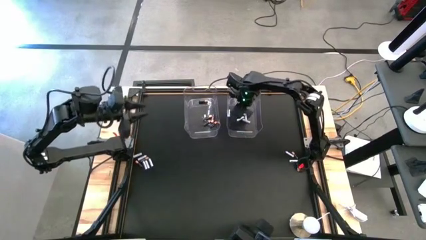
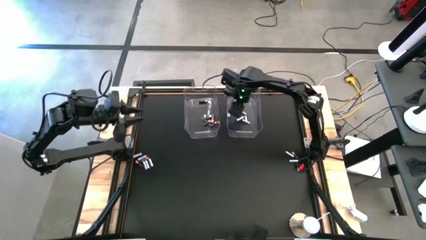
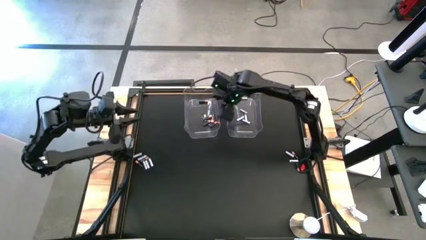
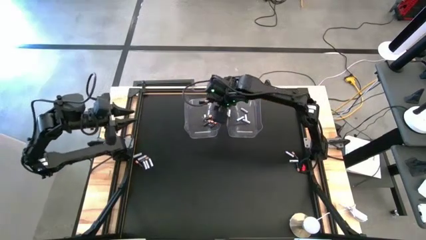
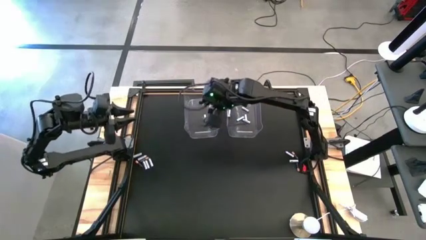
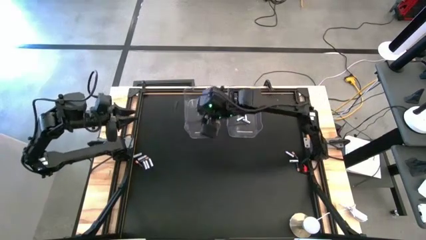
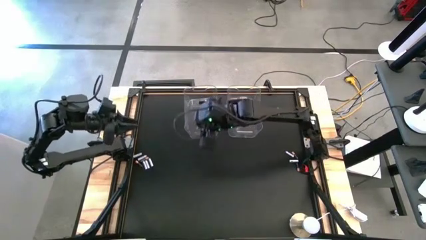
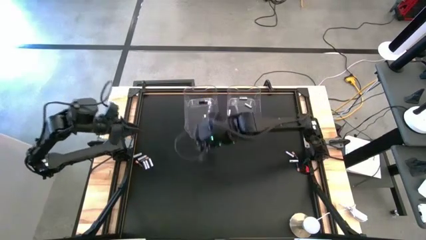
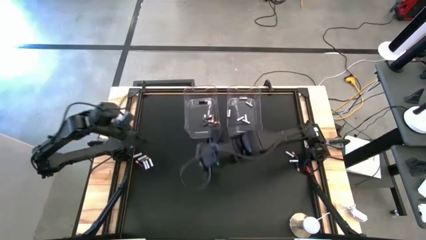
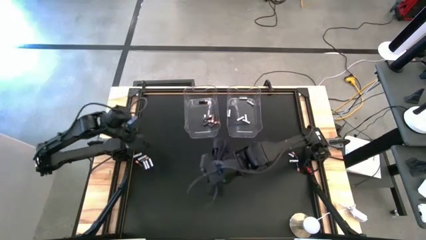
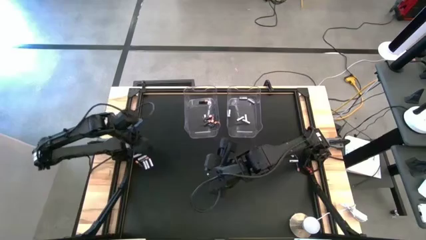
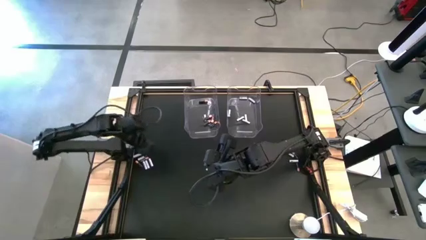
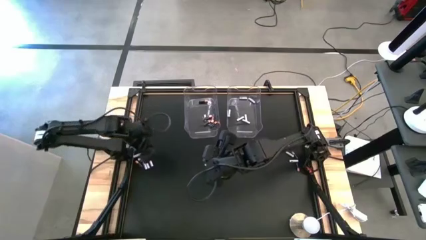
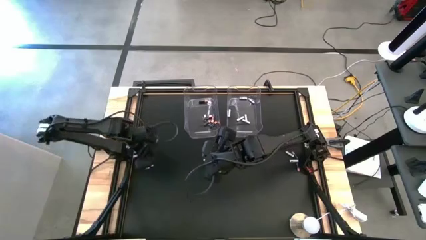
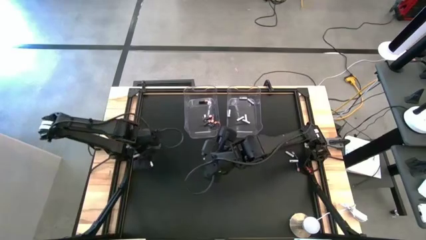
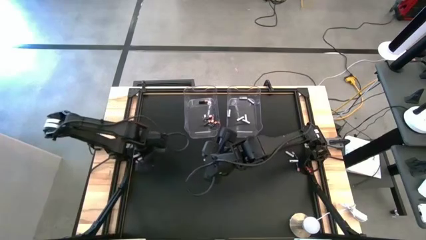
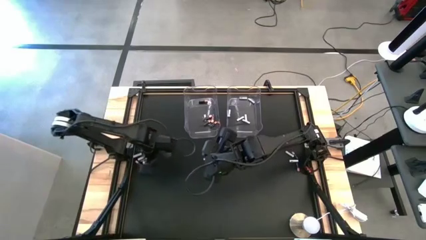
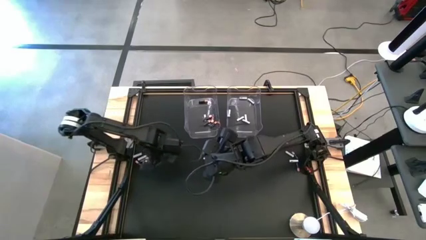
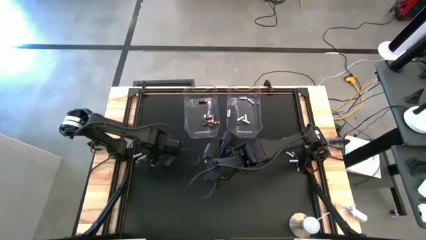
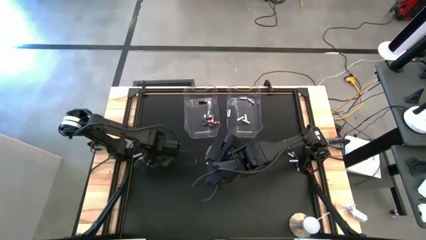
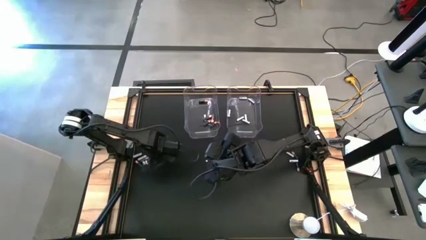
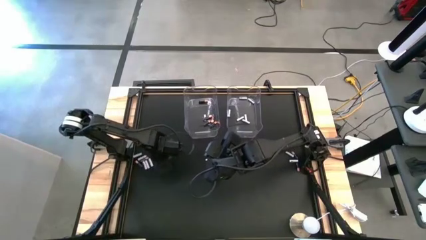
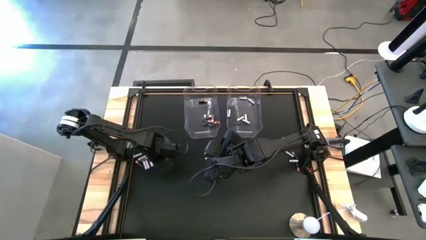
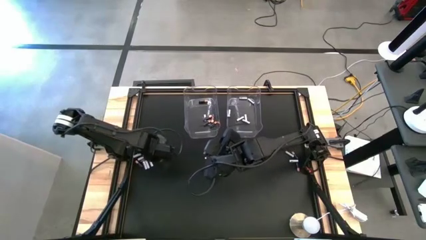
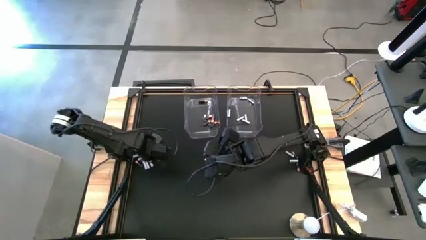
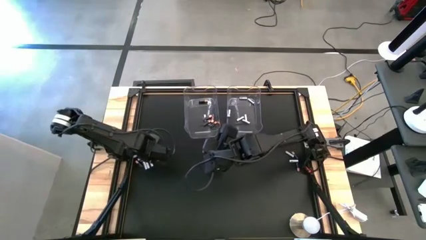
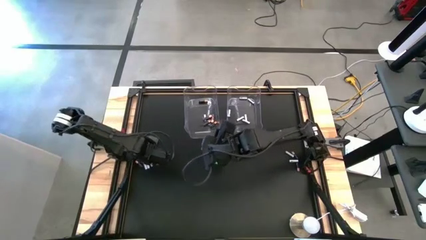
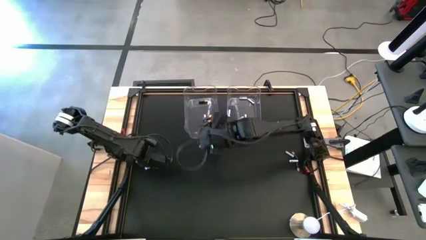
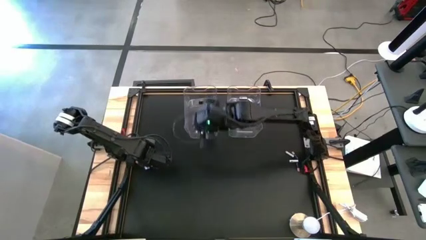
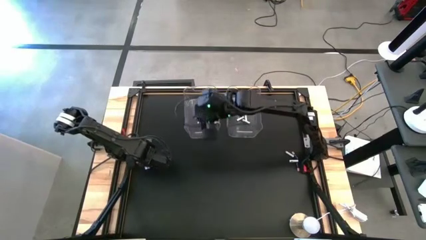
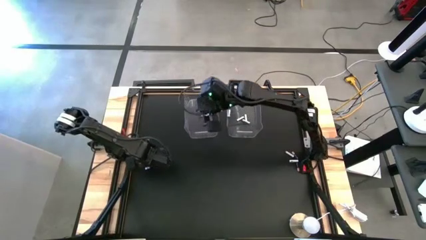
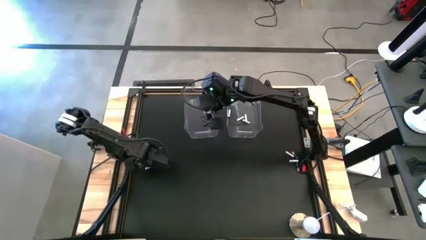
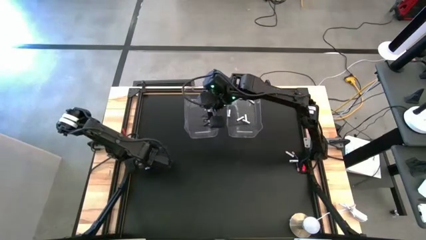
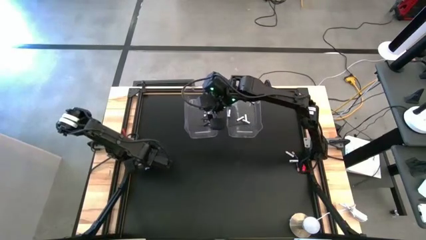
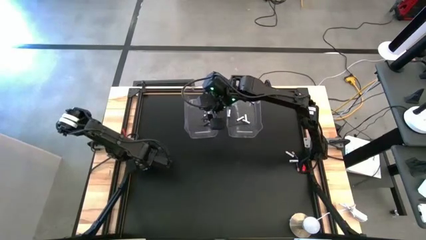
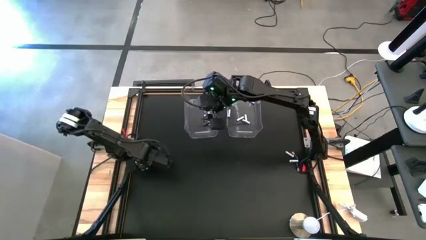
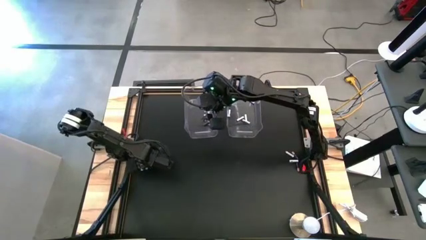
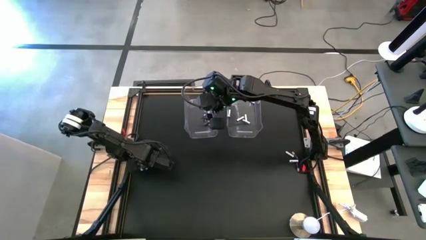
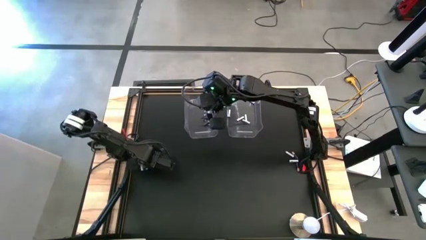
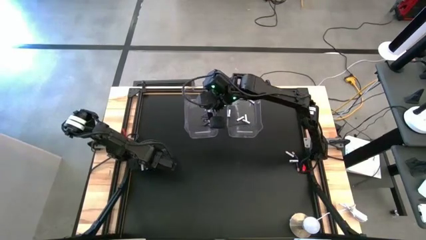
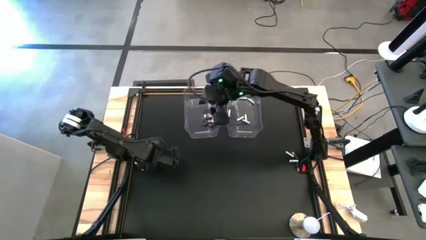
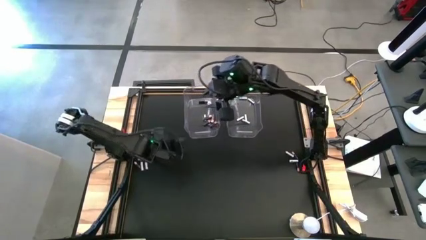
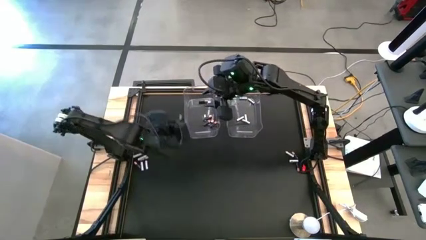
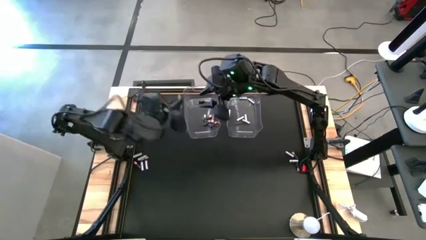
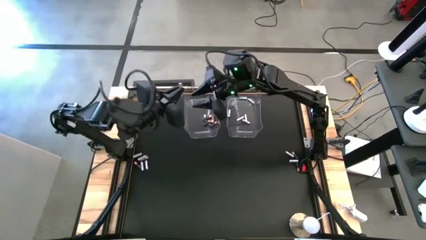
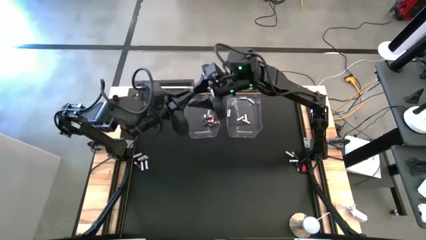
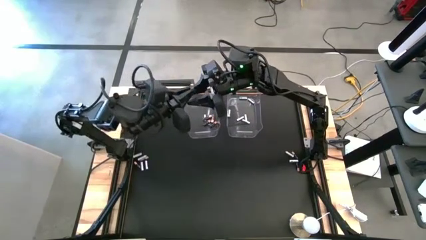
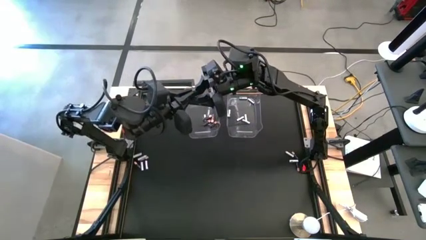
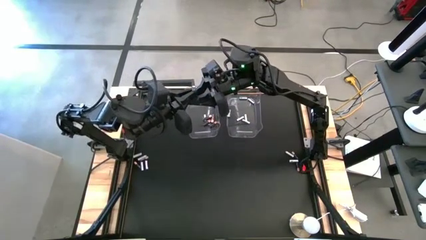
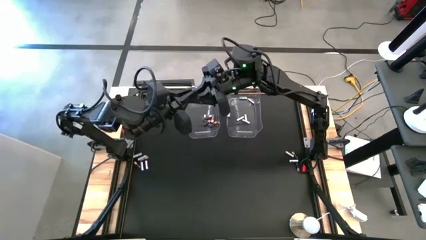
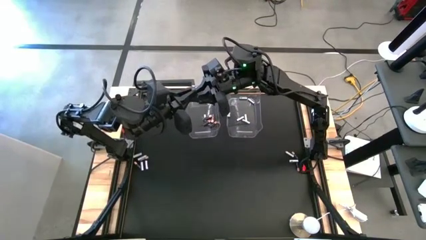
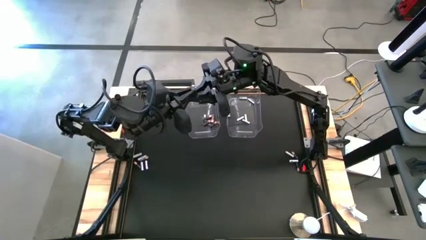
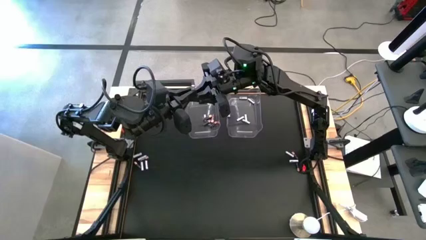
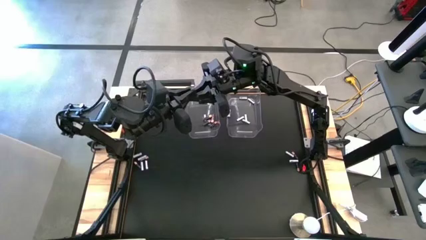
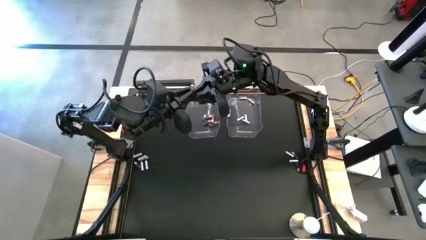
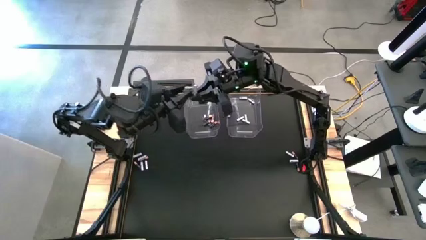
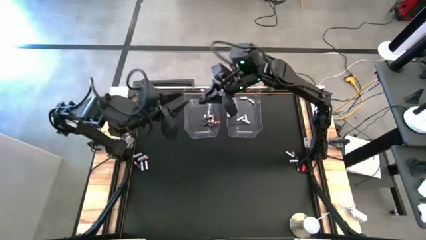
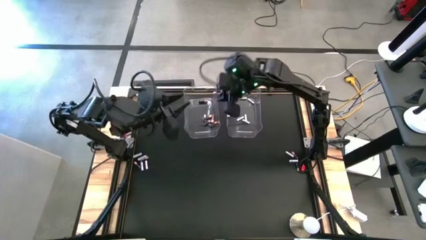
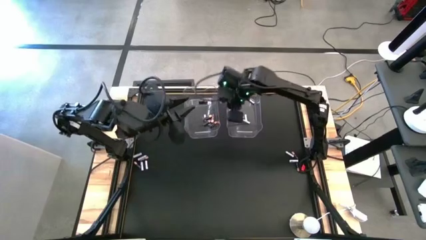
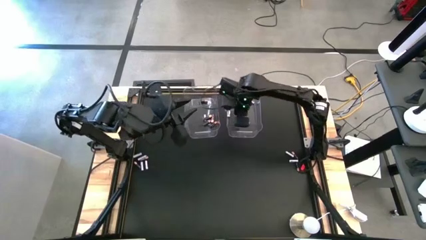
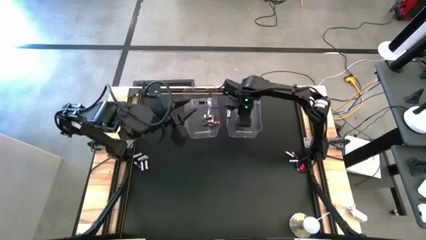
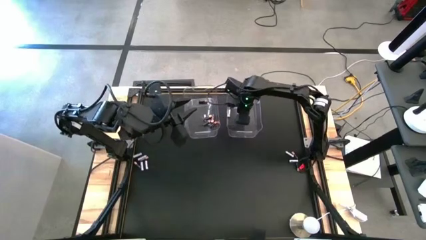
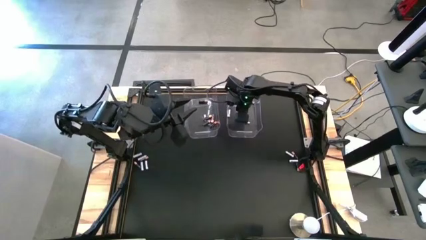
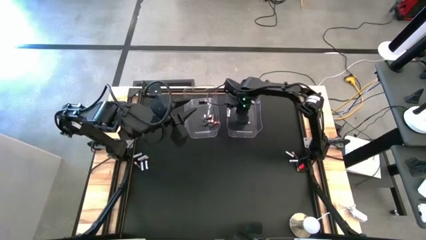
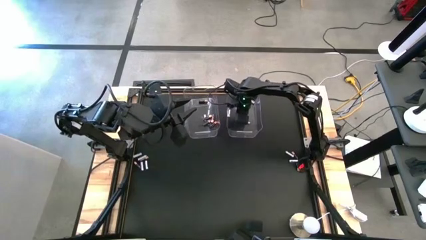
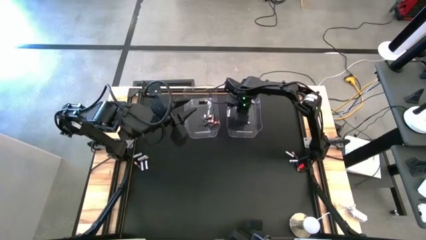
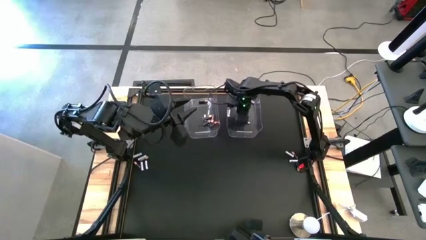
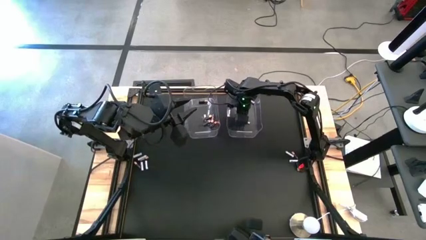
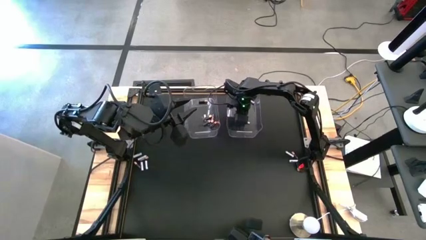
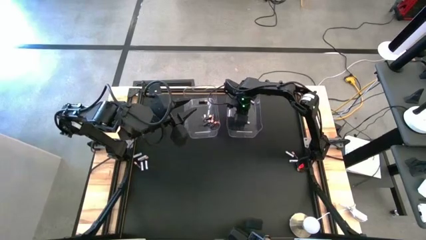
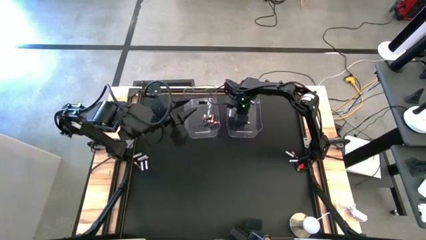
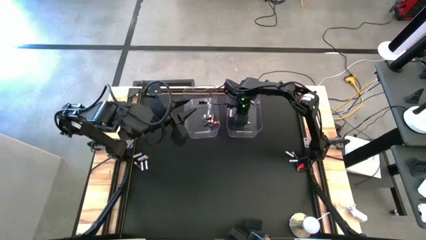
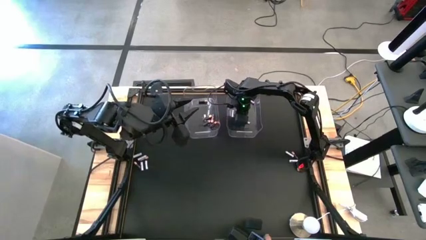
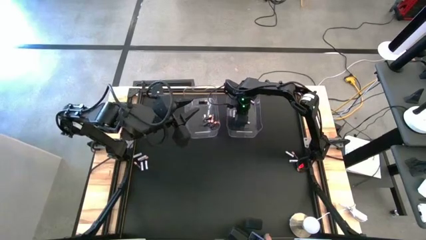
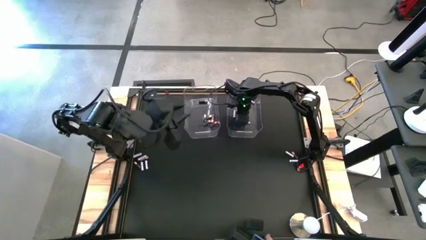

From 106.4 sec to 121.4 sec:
Task: Sort batteries
Put the white battery into the right transparent bin
